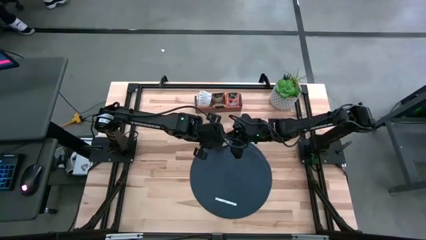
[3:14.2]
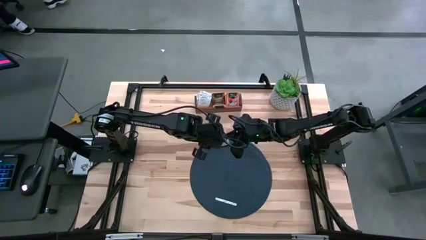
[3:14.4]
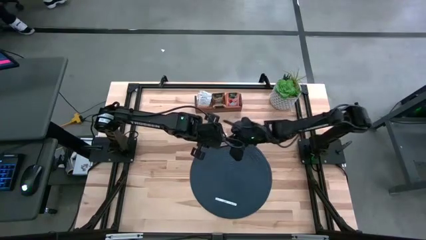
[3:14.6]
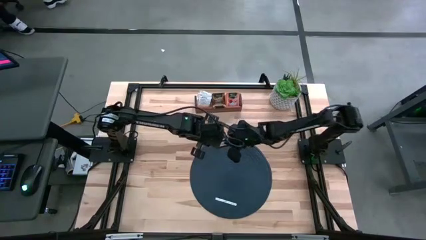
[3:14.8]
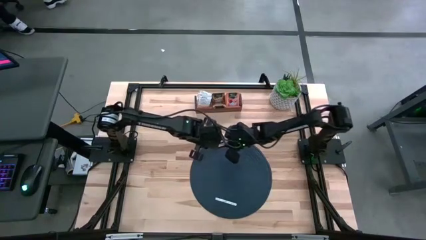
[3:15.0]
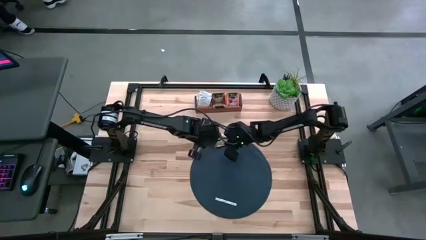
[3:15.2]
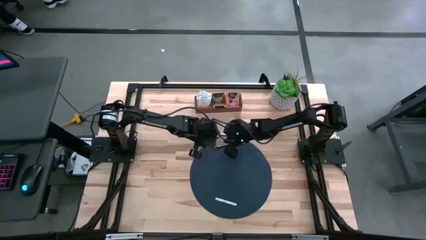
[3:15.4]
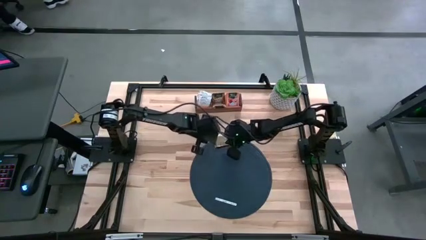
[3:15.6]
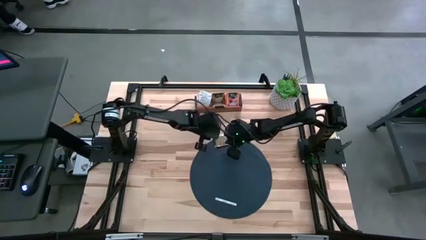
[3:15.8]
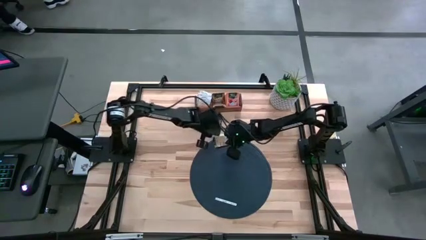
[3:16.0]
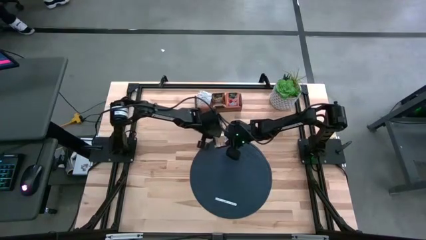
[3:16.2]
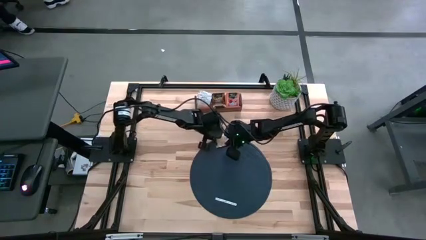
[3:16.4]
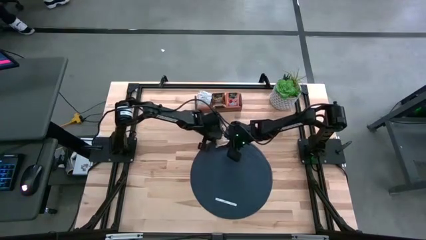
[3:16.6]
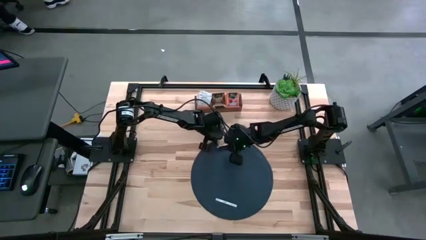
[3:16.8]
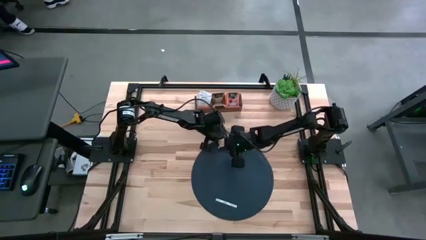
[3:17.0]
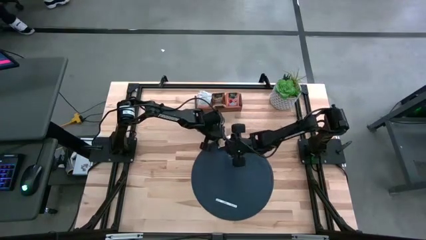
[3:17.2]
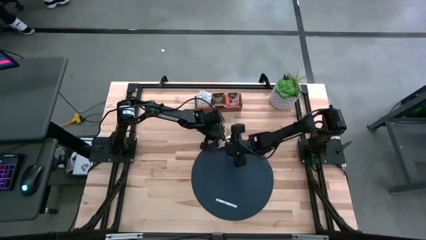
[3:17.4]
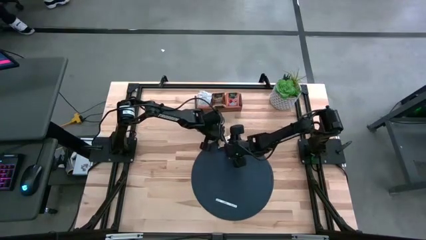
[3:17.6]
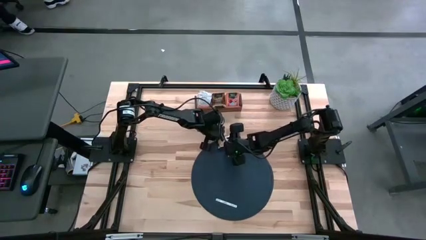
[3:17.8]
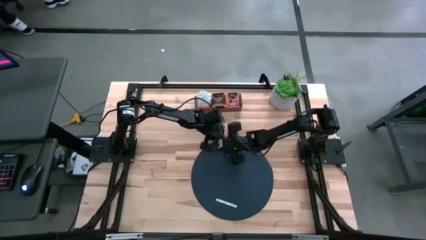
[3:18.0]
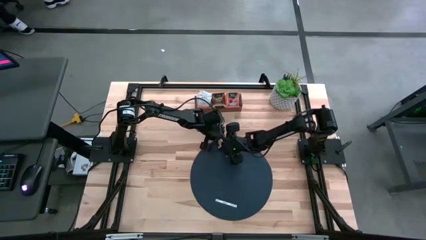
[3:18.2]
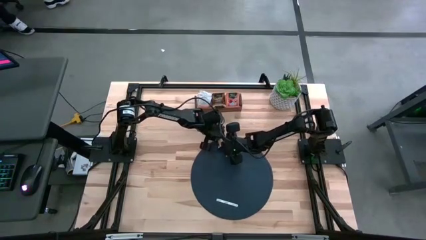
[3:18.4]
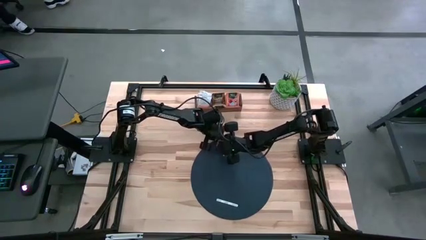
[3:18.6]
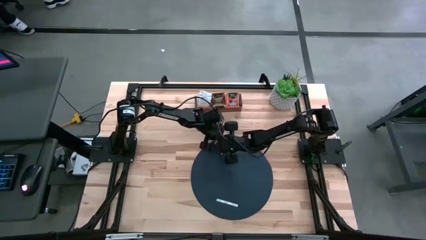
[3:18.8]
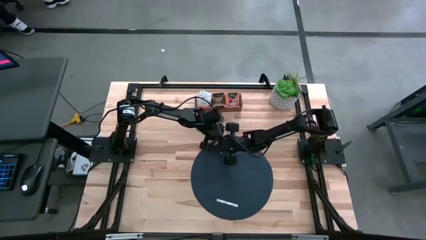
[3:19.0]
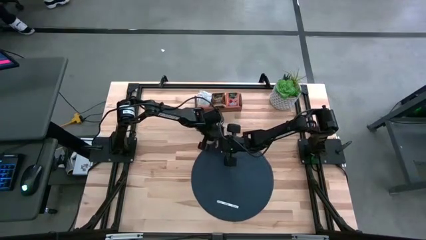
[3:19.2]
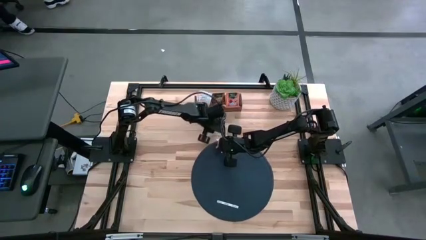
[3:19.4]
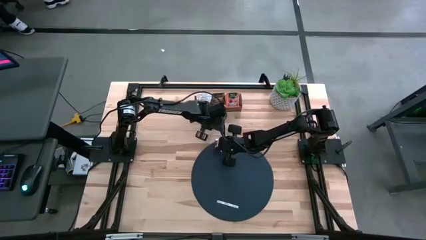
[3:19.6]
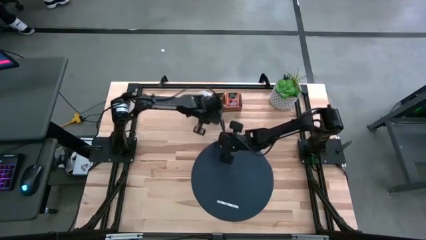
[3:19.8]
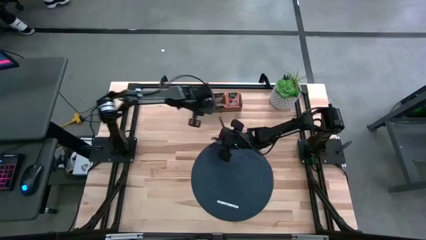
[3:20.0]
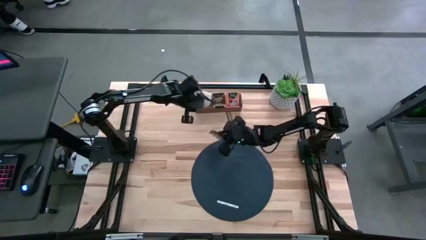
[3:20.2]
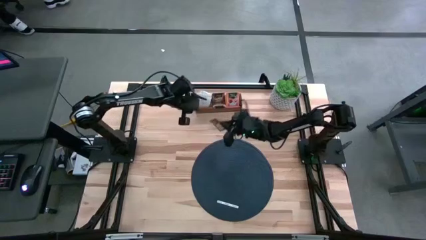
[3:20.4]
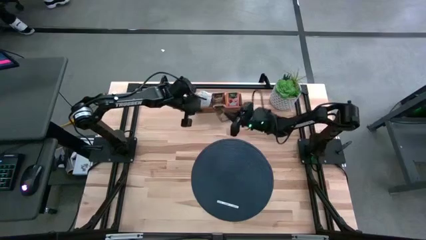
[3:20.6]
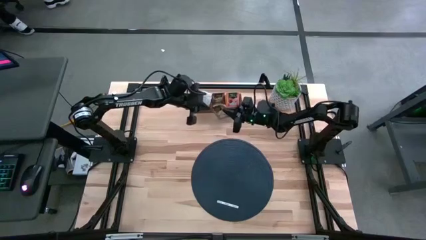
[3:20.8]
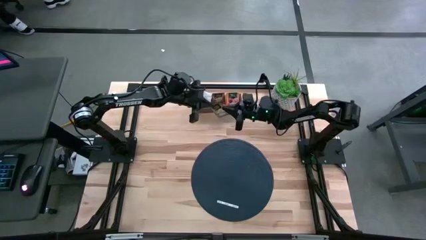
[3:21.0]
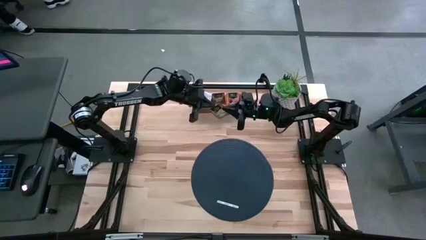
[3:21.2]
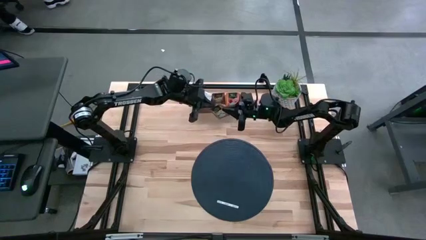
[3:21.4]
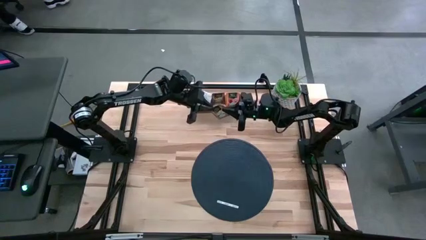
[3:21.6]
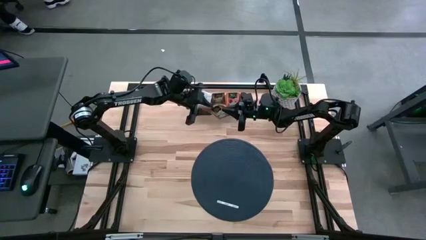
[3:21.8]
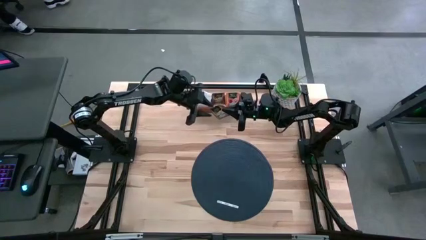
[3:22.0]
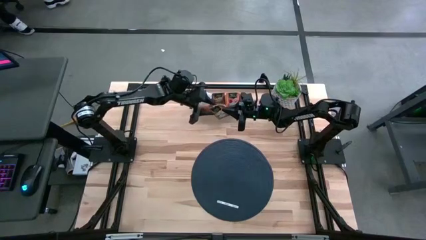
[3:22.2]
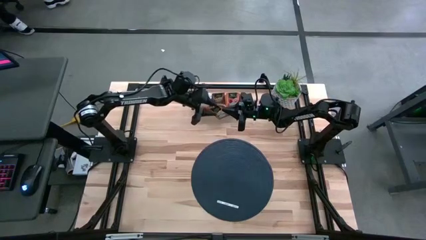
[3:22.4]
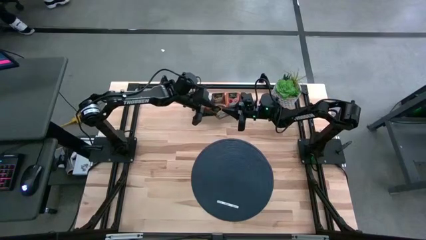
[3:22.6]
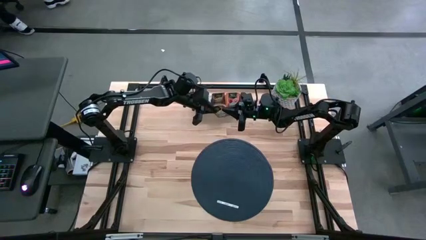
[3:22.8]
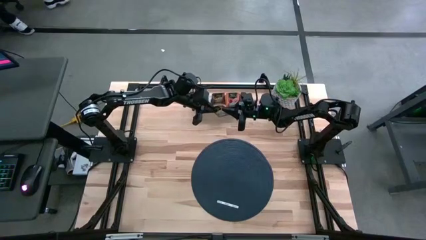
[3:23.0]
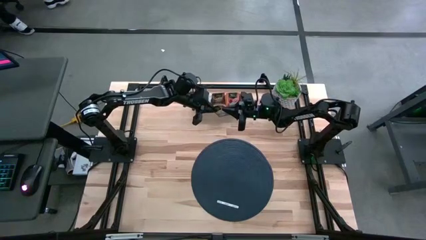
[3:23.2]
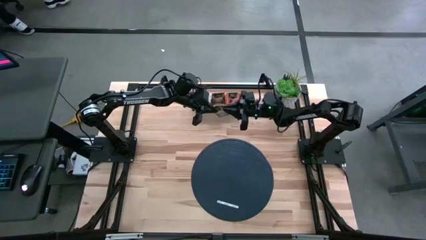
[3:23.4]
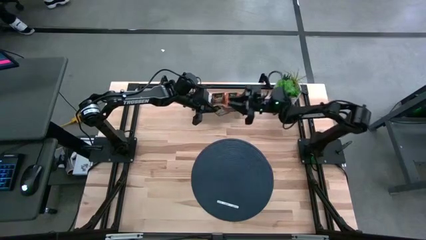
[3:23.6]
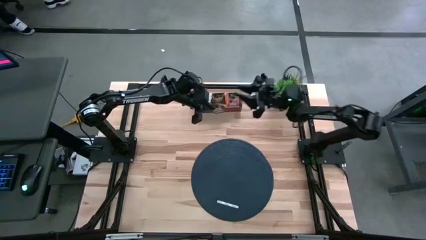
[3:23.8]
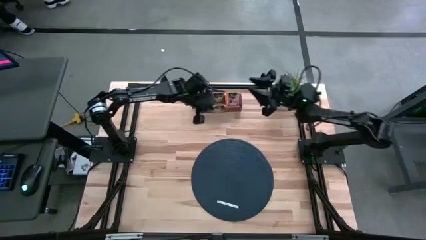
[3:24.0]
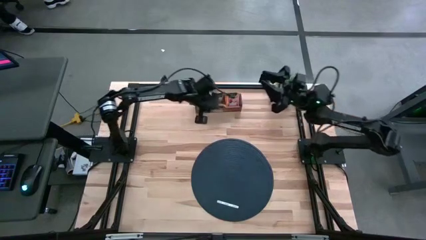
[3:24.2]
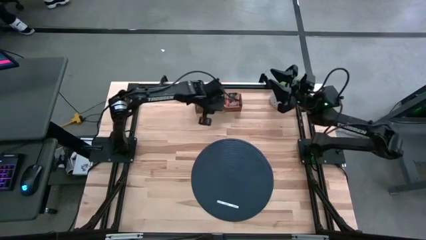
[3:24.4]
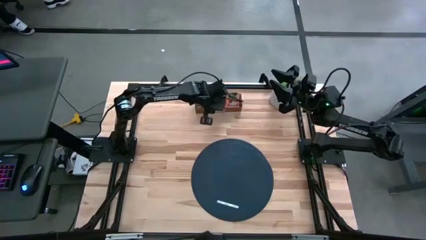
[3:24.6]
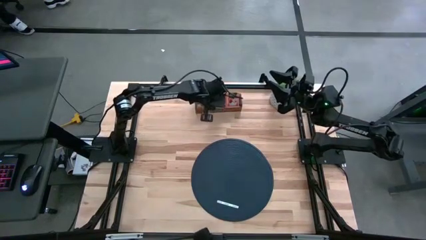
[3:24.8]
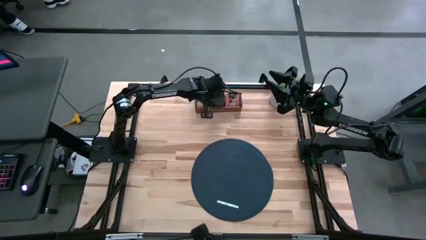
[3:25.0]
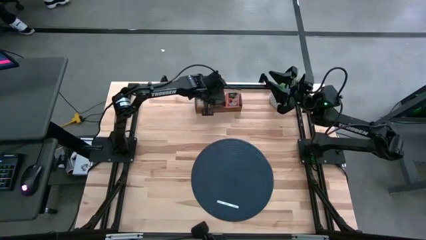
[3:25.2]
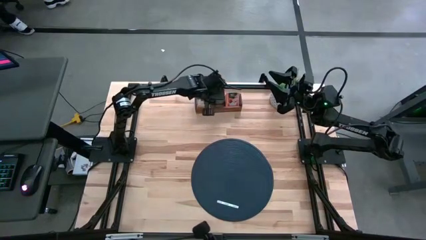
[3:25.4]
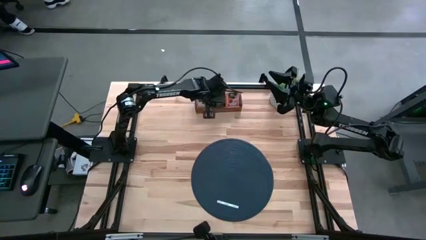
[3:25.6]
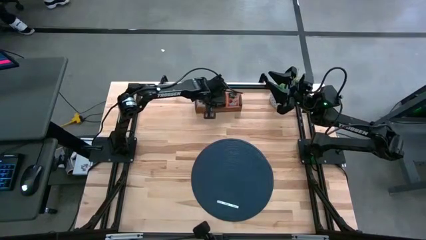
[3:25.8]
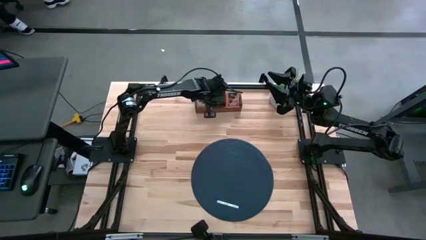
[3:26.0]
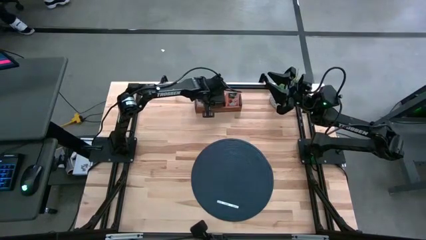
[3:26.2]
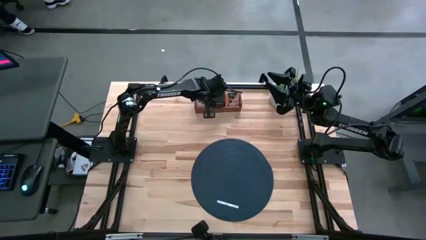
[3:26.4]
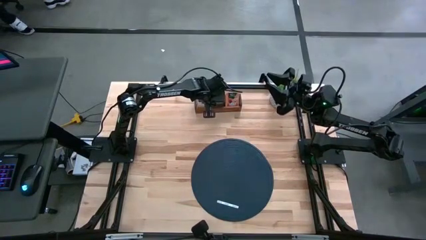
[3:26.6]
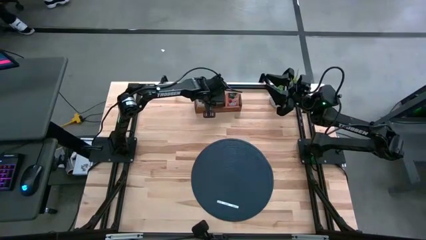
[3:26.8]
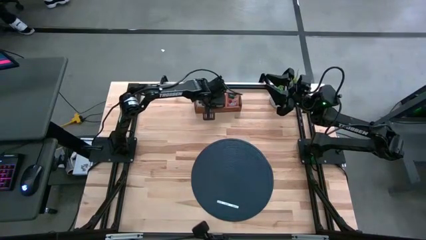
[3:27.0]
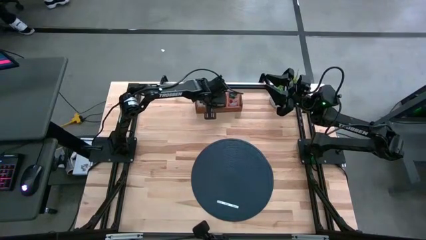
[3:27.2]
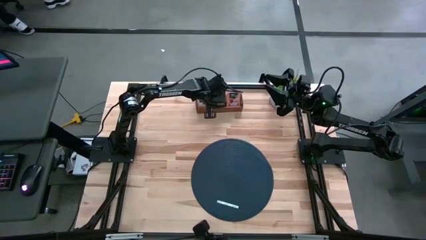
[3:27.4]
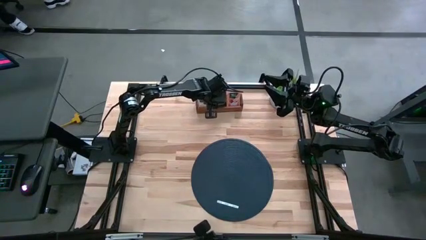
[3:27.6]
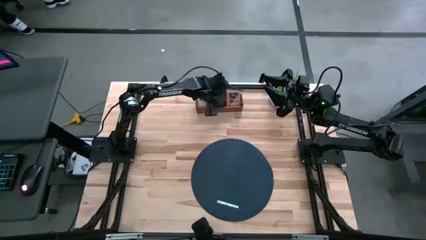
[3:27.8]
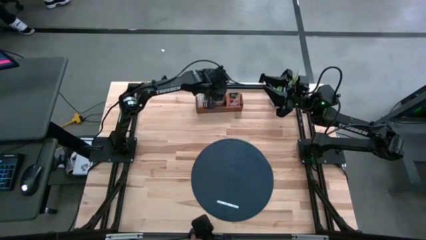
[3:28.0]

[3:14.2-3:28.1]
Task: Pick & Place Tea
Put the brown tea bag into the middle section of the wooden organizer
